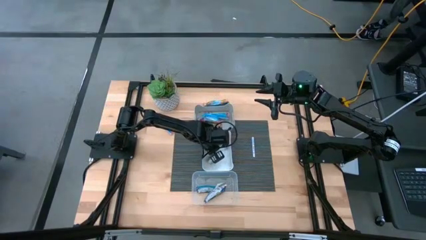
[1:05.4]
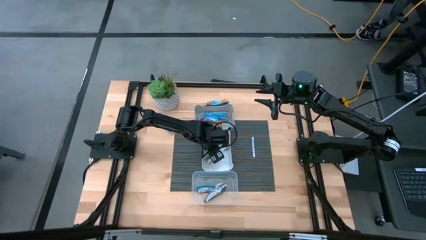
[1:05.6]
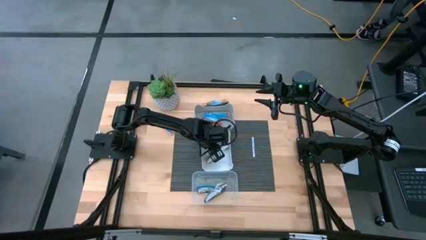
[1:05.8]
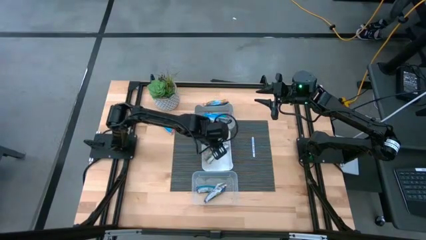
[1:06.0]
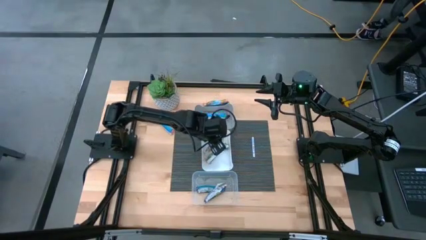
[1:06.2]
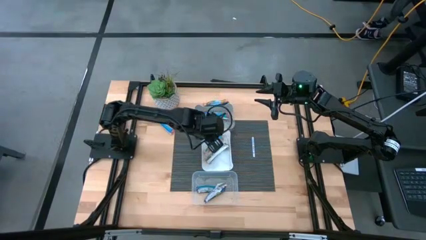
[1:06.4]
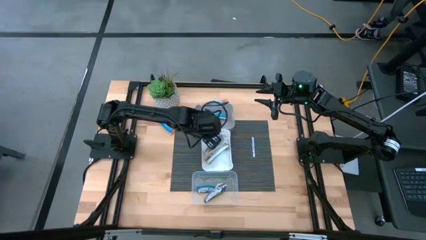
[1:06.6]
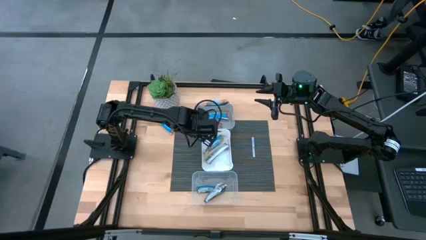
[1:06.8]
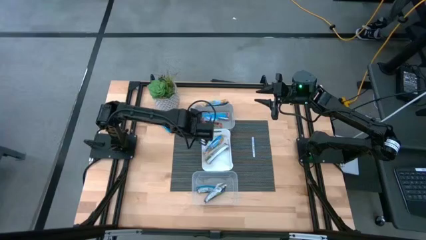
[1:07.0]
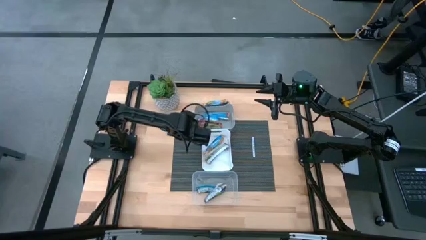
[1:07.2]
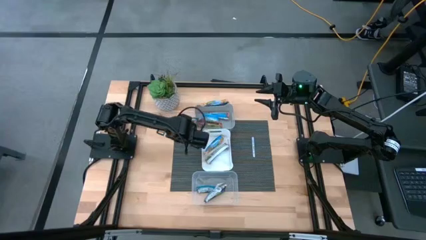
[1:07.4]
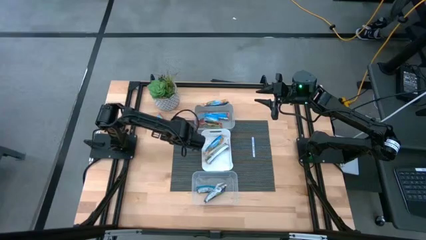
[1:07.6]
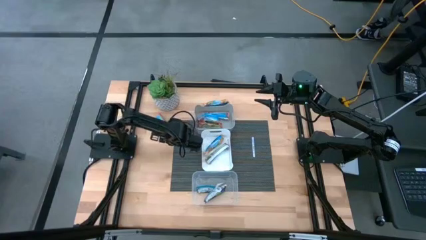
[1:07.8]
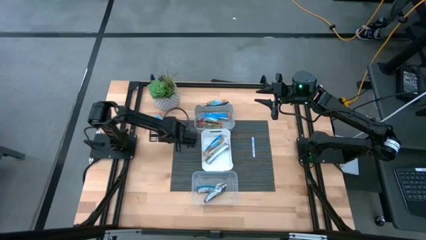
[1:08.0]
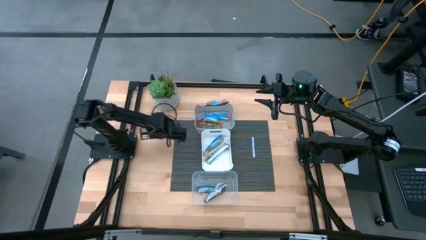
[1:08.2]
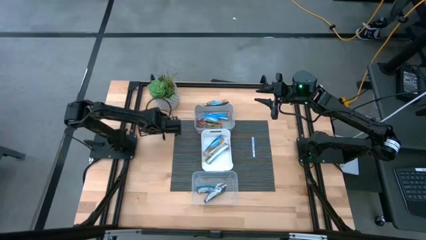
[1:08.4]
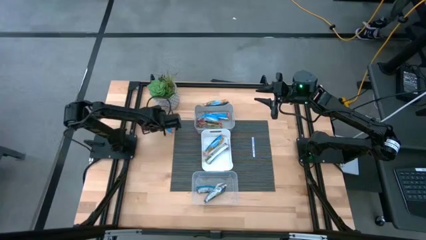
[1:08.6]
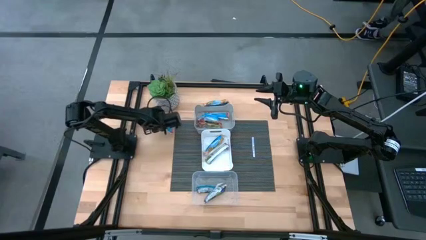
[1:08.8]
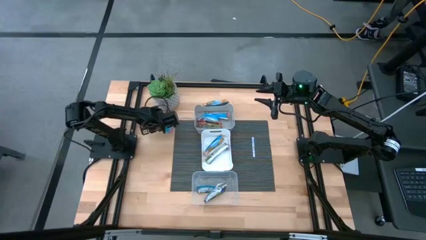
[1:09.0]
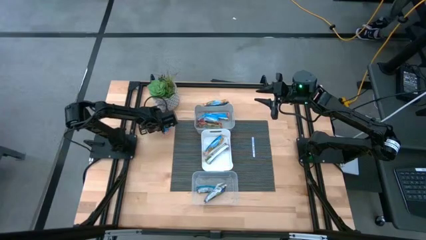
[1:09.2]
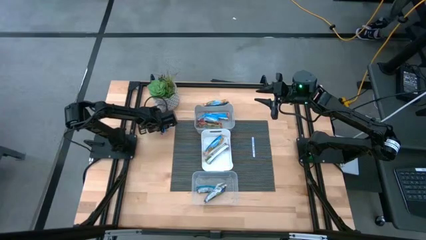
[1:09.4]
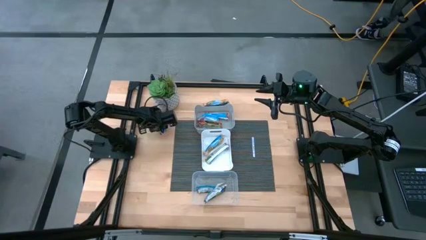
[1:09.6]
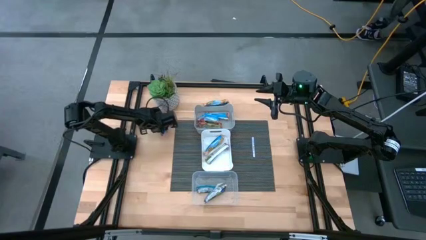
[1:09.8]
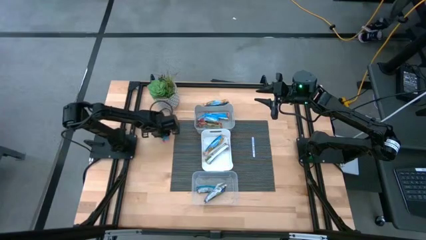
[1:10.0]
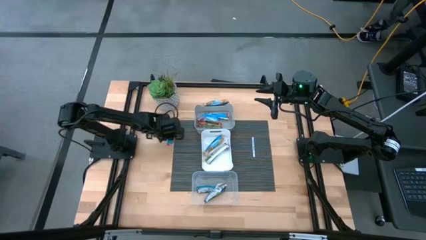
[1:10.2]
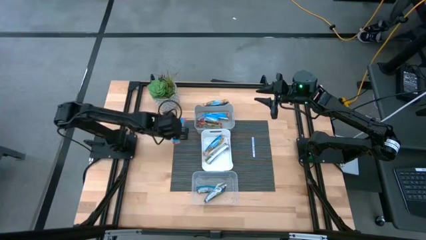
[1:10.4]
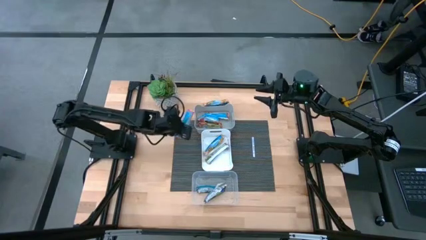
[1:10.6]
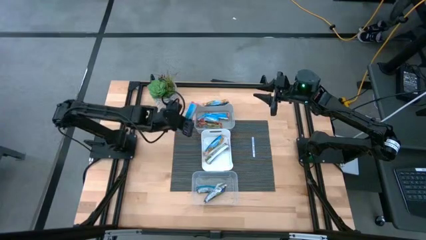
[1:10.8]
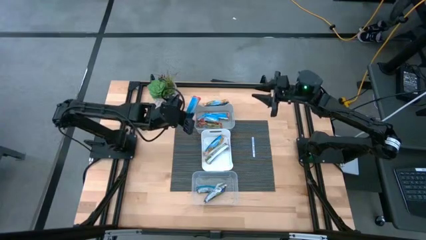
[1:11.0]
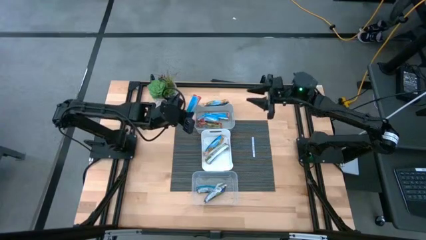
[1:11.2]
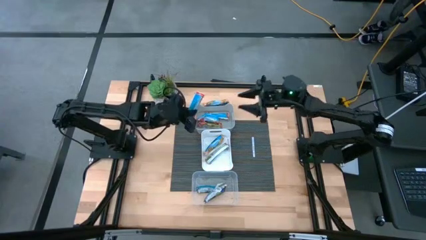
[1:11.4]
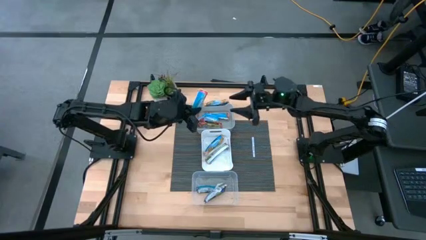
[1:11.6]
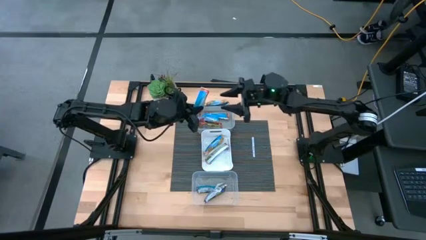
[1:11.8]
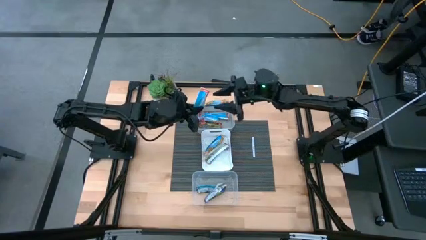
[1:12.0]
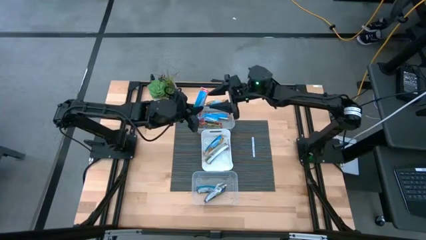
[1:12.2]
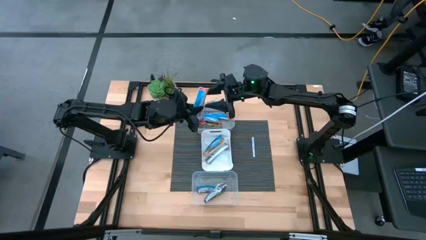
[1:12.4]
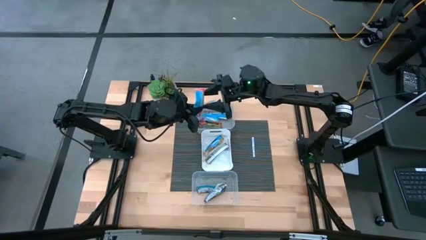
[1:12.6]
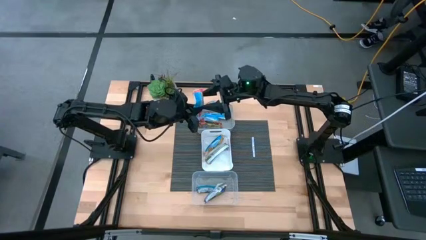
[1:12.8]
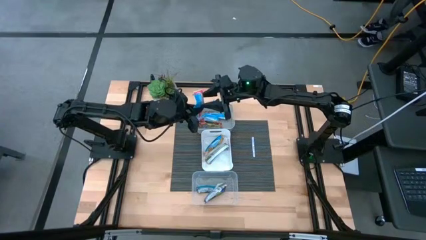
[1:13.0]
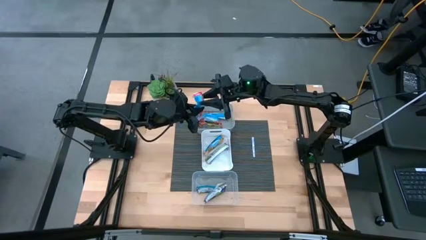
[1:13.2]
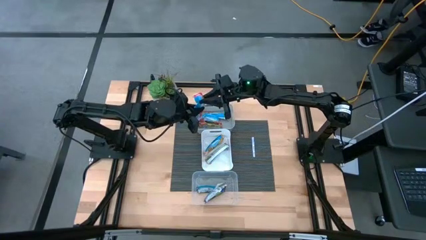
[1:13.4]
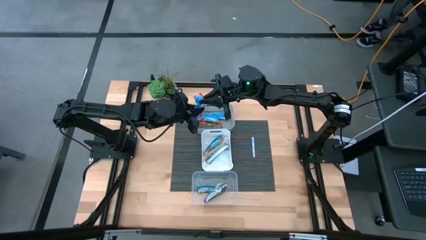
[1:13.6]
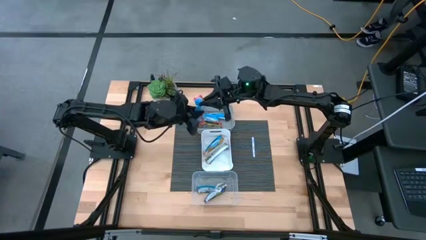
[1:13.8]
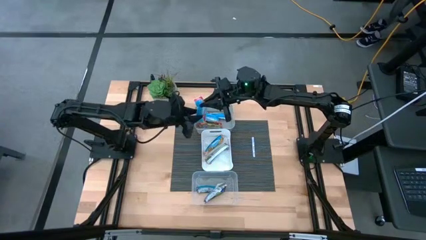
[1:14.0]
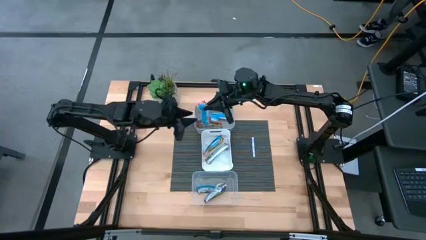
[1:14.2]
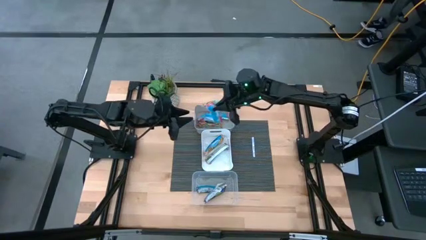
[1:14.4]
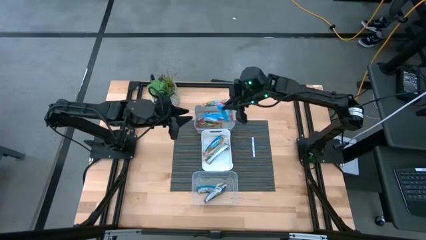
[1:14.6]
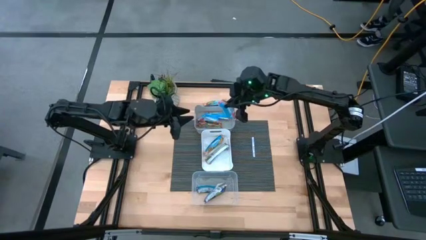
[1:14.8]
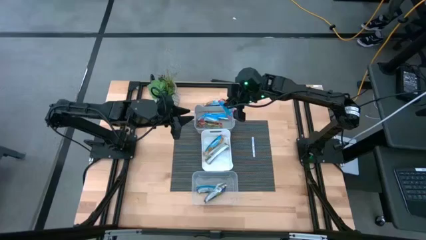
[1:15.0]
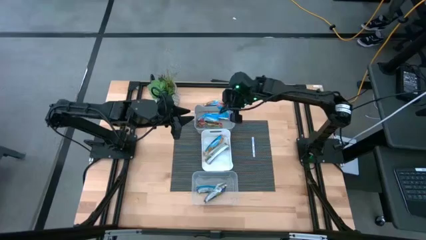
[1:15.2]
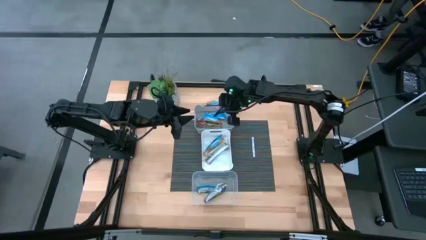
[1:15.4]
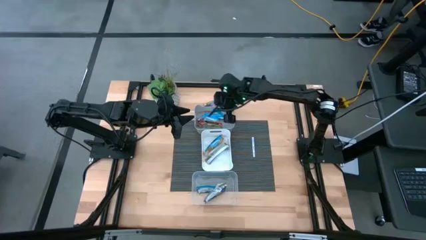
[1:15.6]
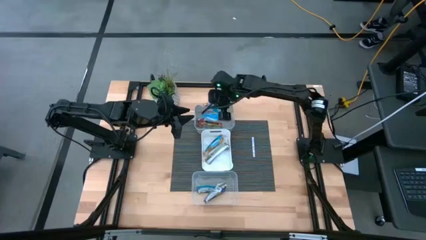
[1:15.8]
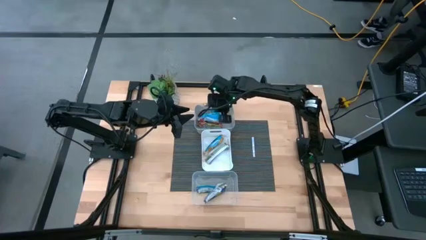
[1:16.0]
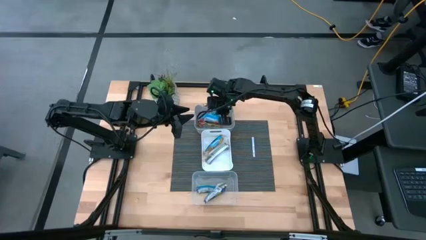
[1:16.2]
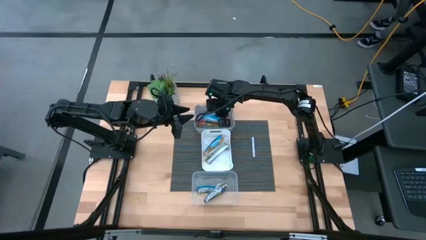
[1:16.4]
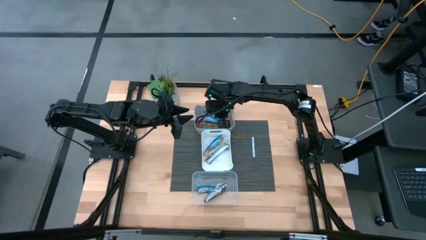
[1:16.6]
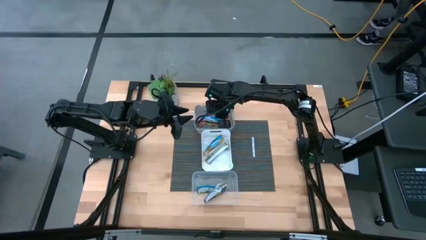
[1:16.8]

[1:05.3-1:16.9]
Task: Pick and place Granola Bars by type
Put the red granola bar into the gray bin

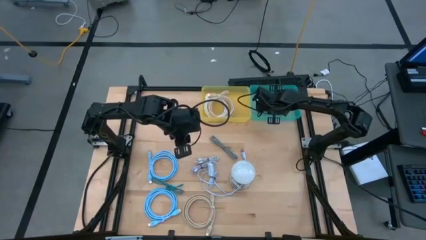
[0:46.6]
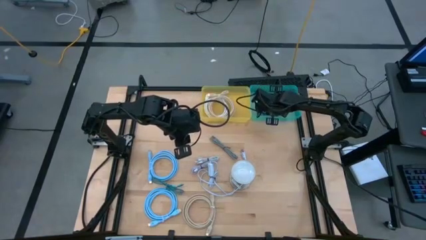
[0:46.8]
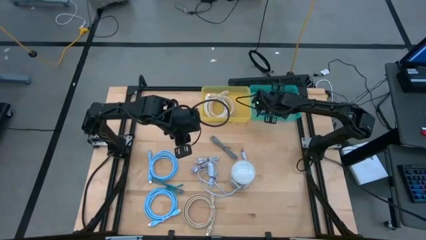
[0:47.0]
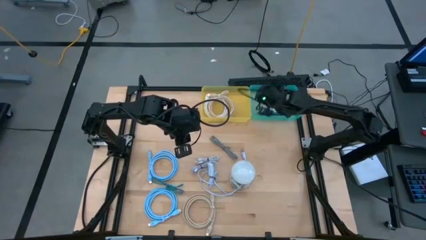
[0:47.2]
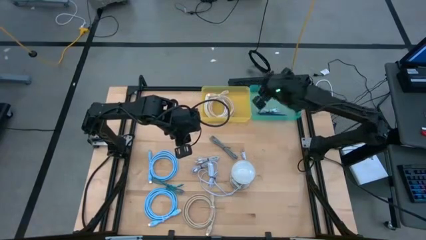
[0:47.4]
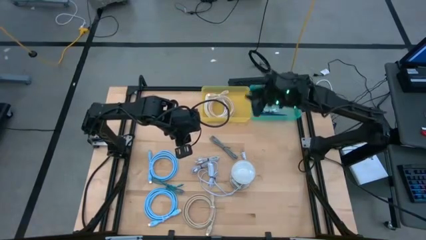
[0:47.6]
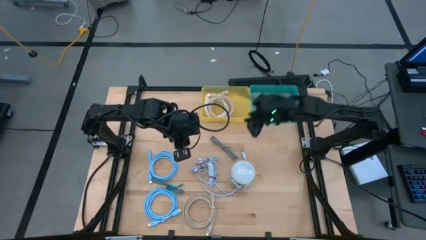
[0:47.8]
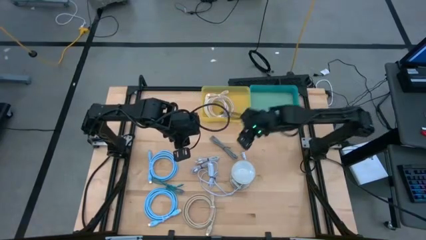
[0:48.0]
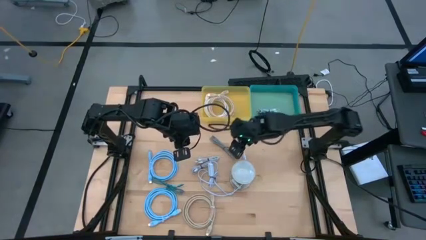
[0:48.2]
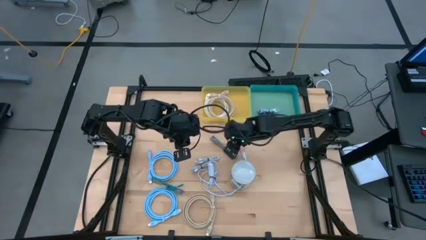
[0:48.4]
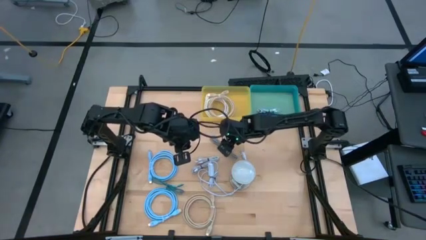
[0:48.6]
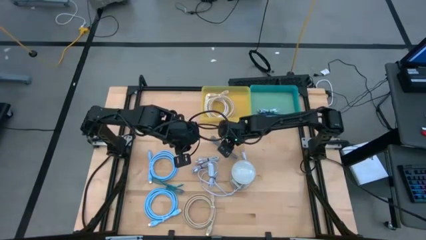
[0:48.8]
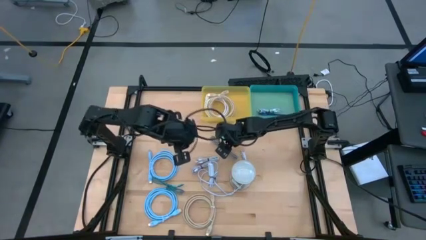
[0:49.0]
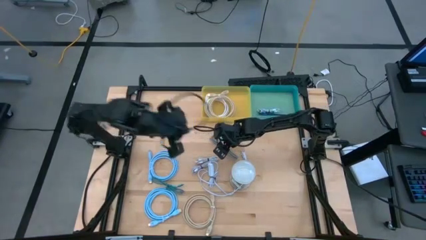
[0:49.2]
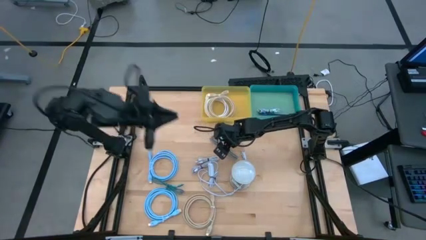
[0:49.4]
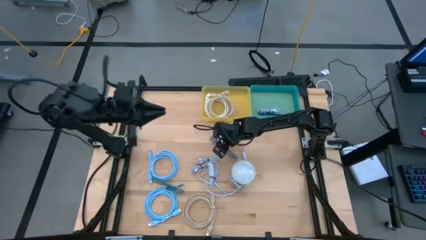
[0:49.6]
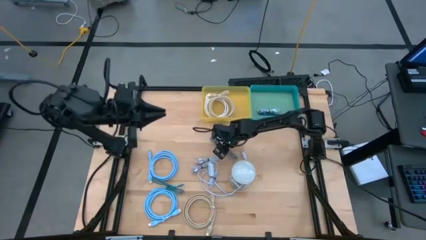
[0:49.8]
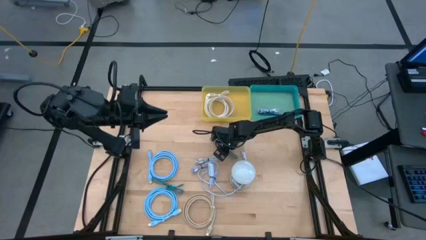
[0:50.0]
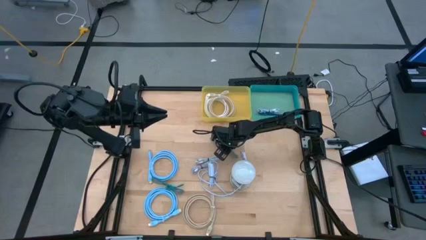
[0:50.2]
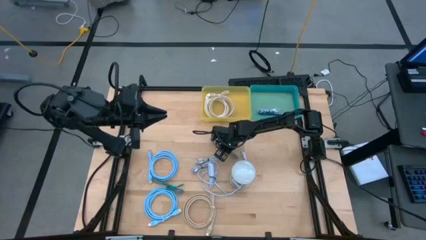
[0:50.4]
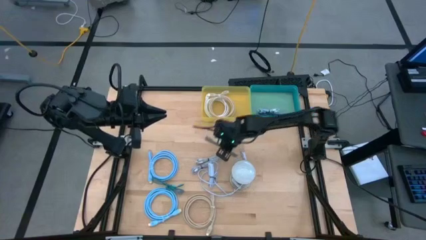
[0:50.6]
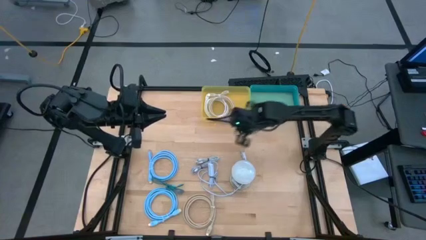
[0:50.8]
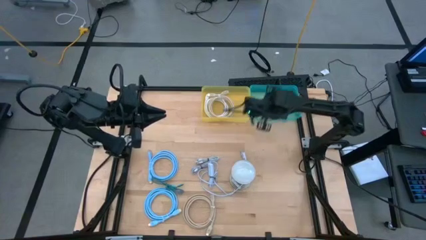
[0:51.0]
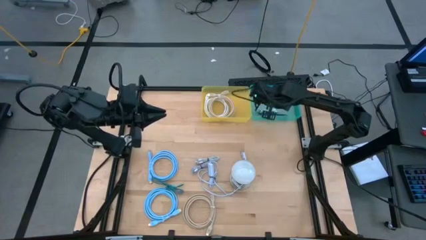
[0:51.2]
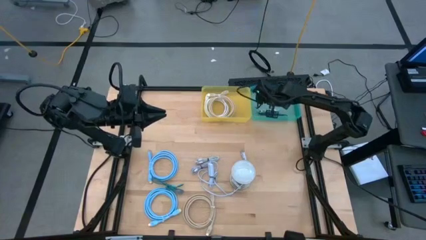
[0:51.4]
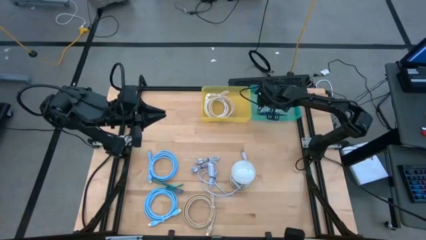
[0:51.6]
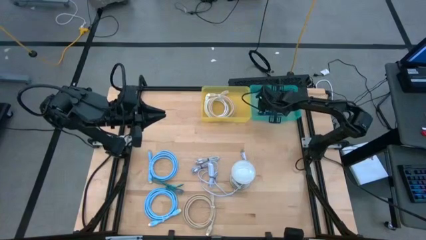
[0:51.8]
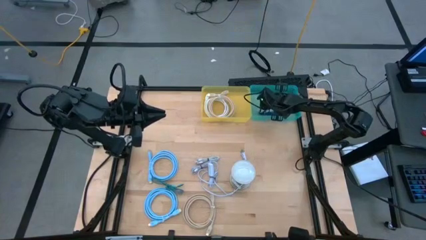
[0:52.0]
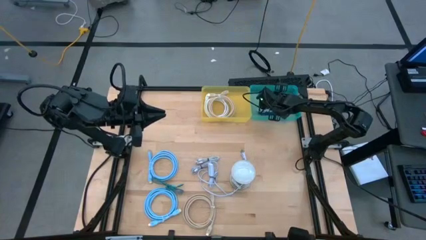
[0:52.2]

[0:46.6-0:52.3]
Task: Pick & Place USB Port
Put the black and white charger cable into the green bin
